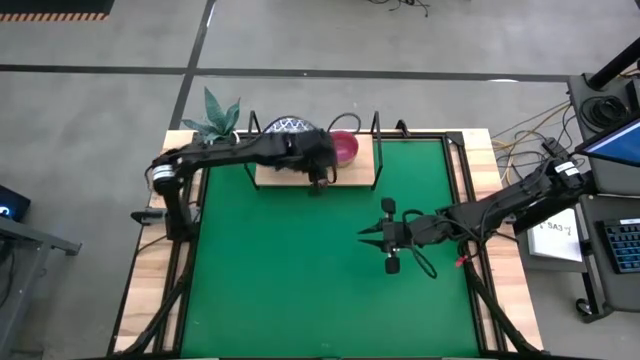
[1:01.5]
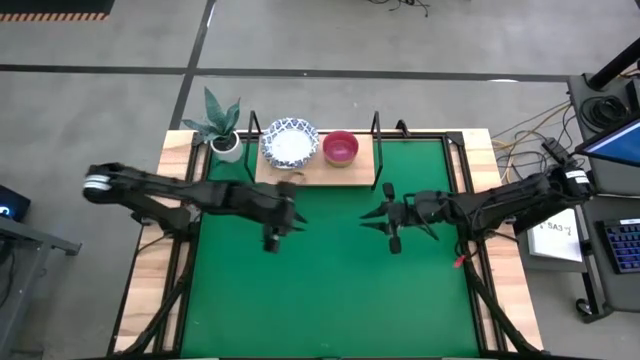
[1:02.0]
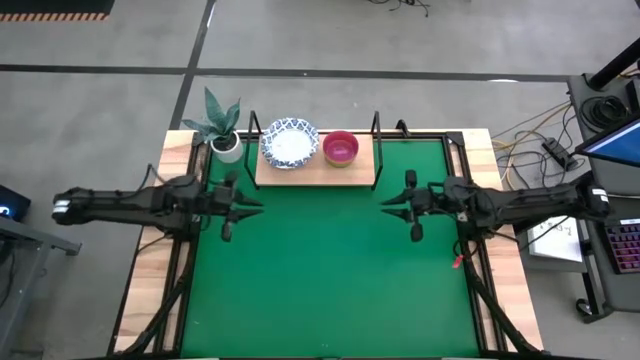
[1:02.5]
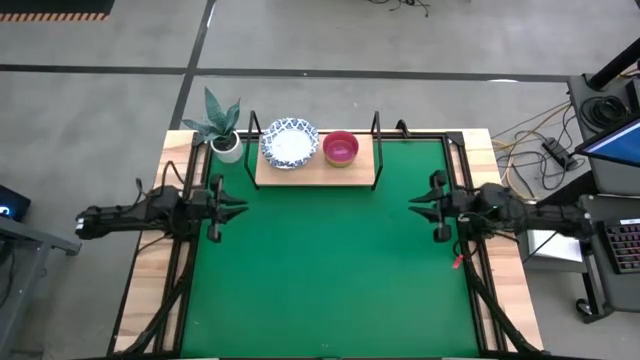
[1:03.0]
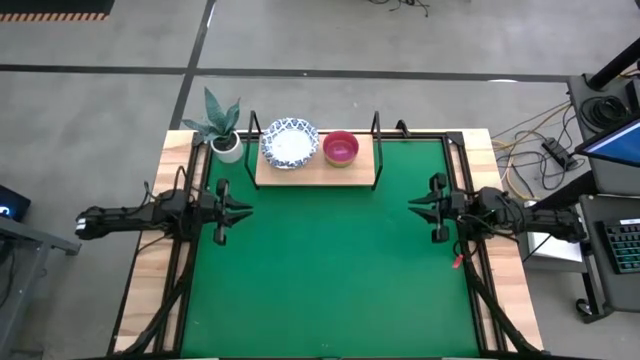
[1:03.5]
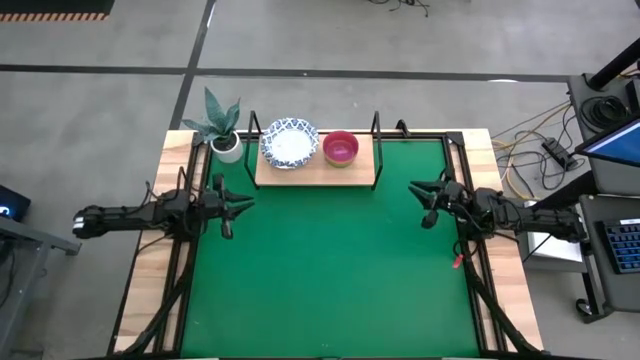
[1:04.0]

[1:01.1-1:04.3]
Task: Place and stack bowls onto a shelf
Return to Home Position

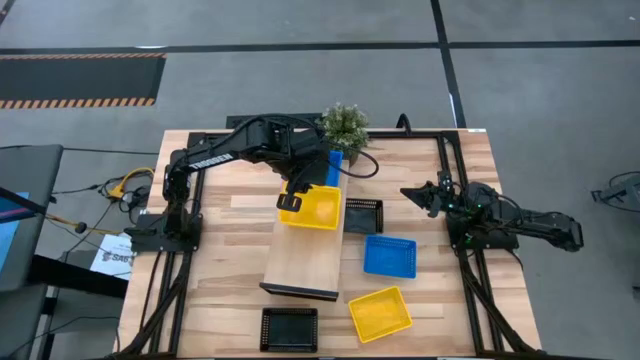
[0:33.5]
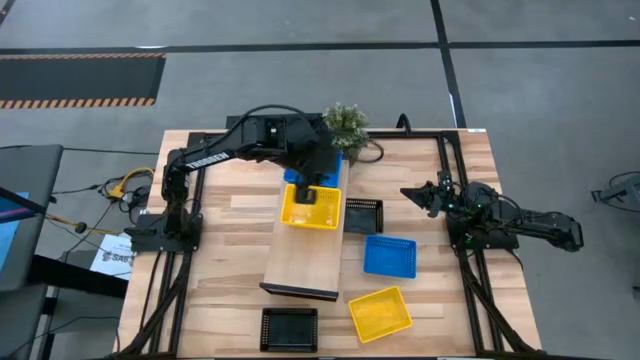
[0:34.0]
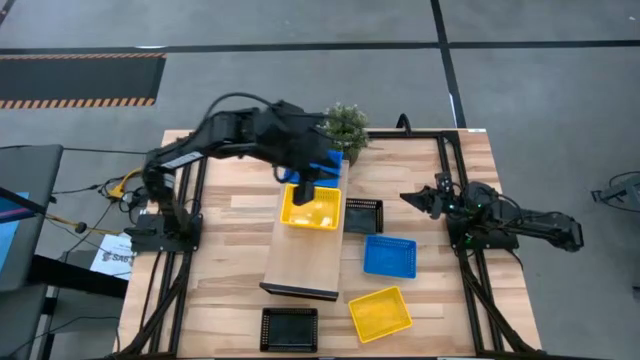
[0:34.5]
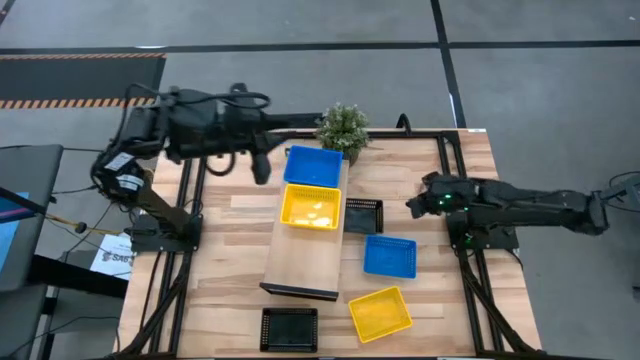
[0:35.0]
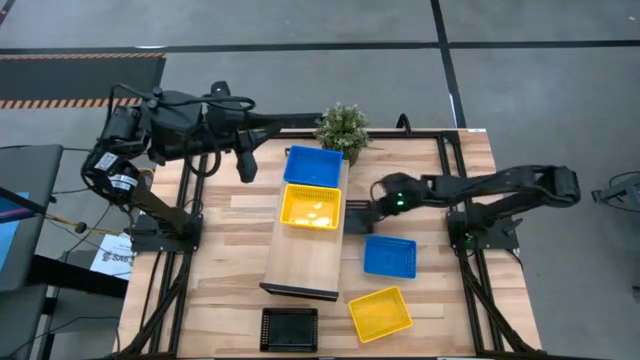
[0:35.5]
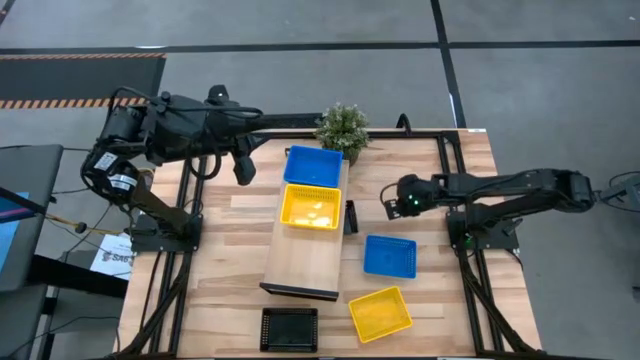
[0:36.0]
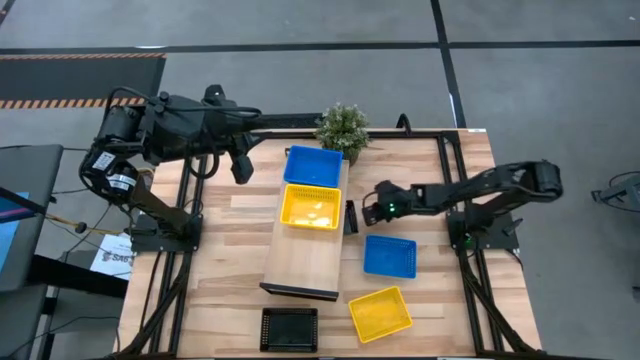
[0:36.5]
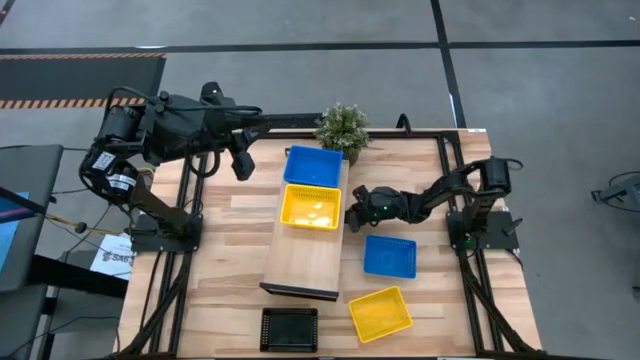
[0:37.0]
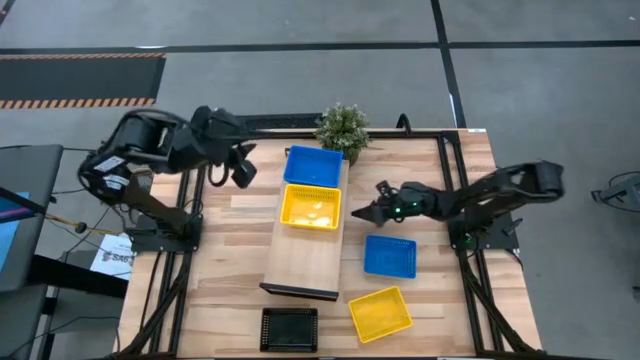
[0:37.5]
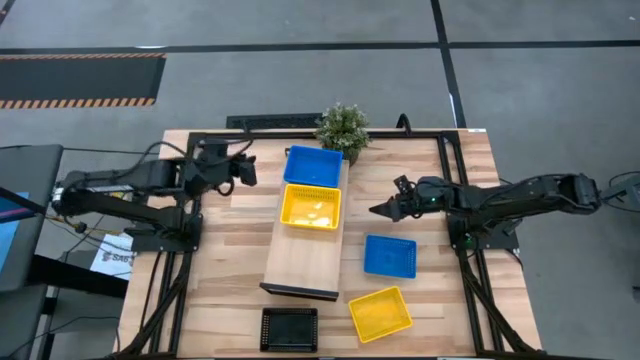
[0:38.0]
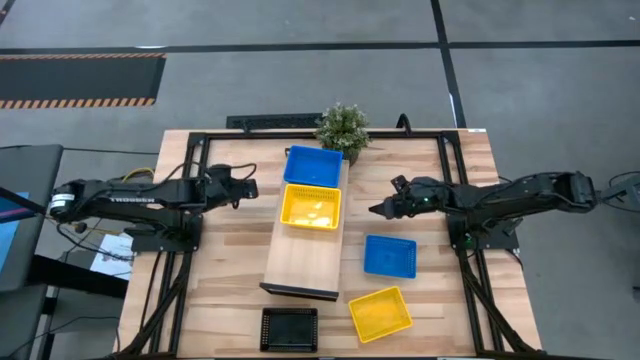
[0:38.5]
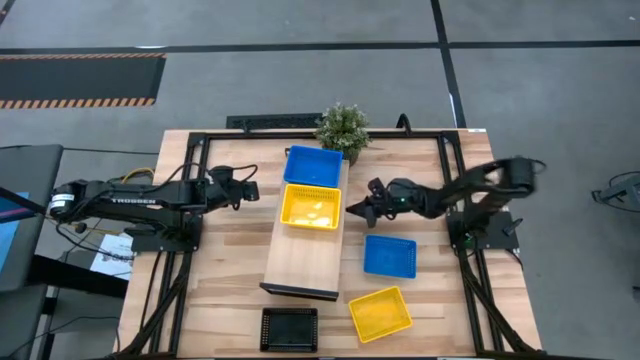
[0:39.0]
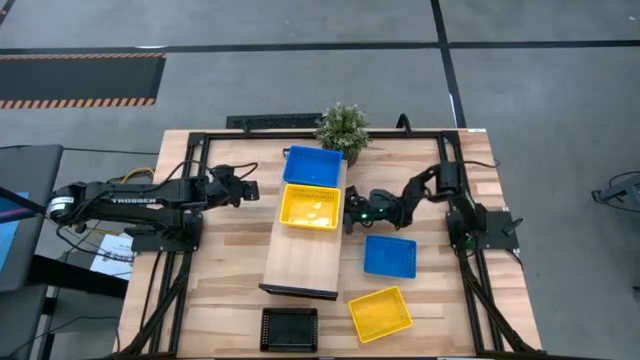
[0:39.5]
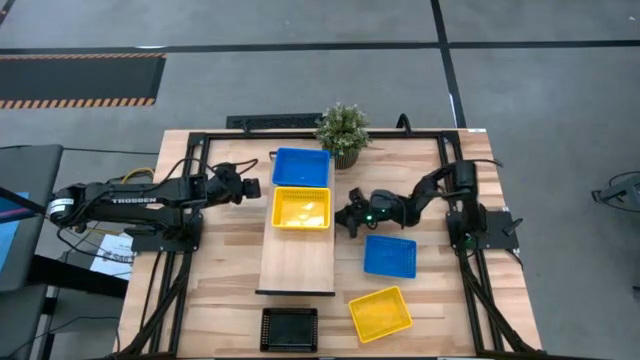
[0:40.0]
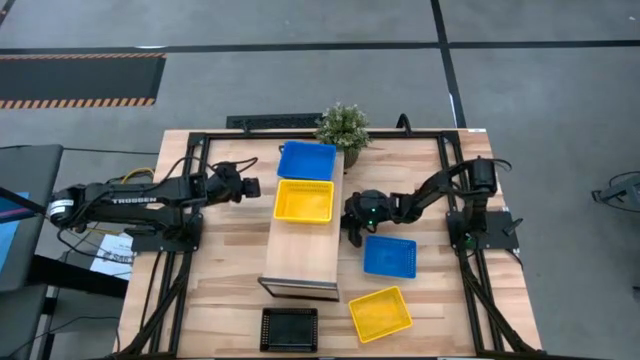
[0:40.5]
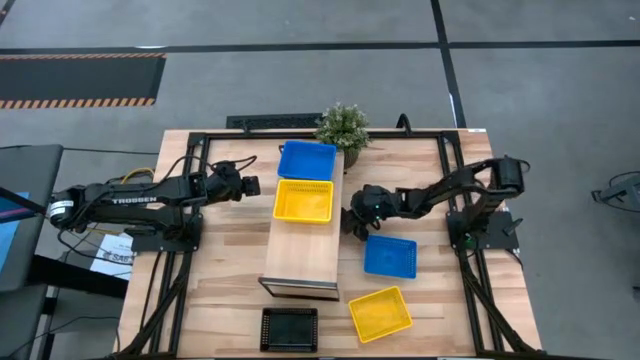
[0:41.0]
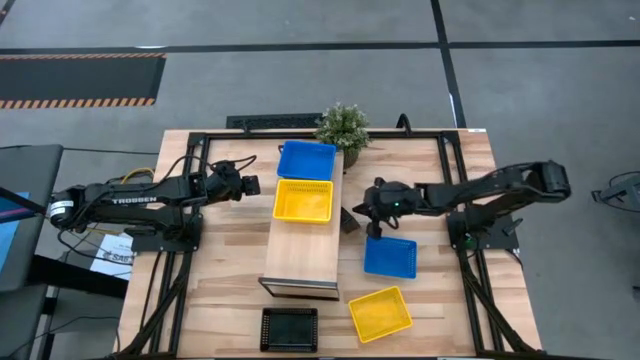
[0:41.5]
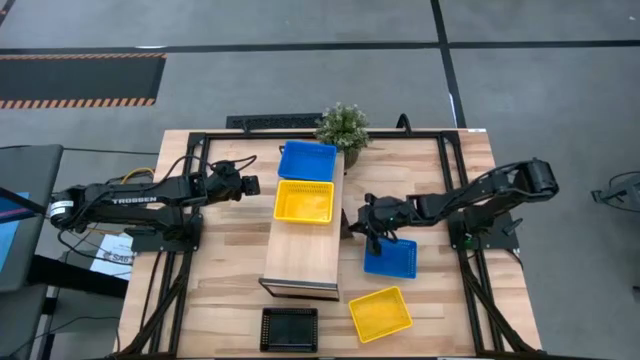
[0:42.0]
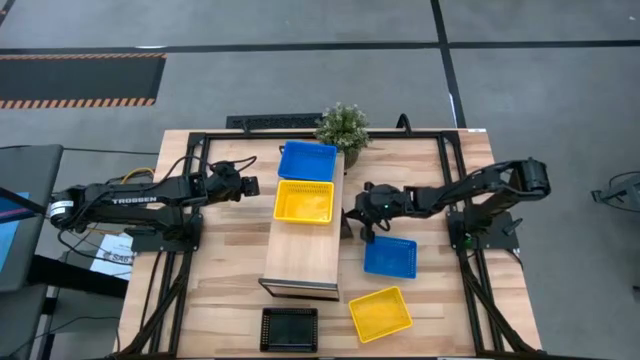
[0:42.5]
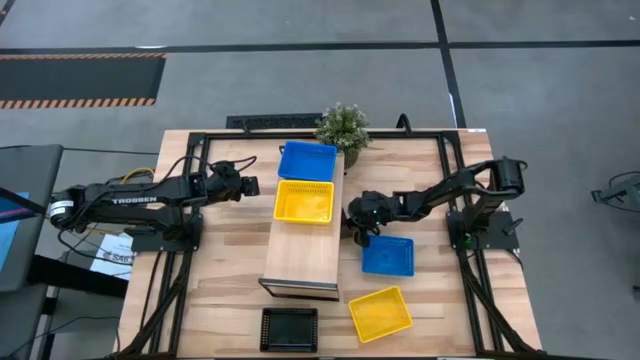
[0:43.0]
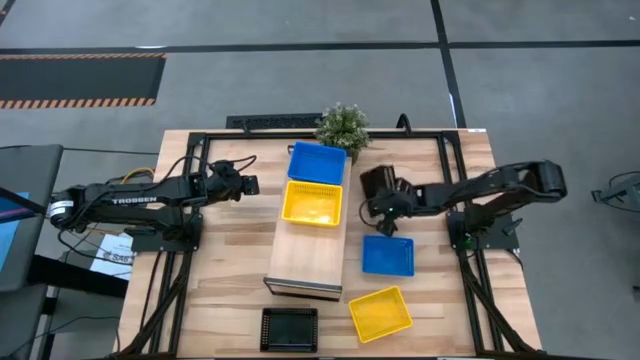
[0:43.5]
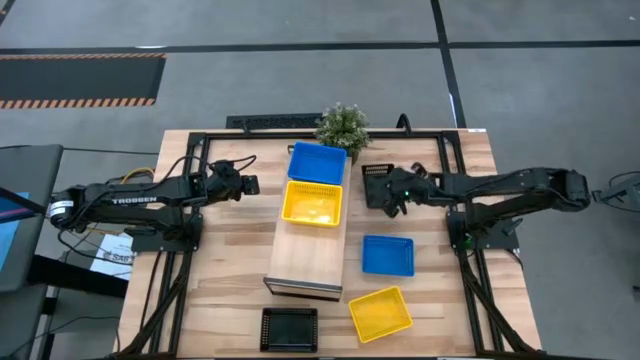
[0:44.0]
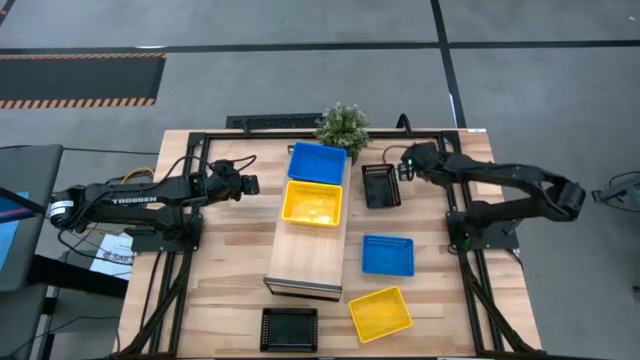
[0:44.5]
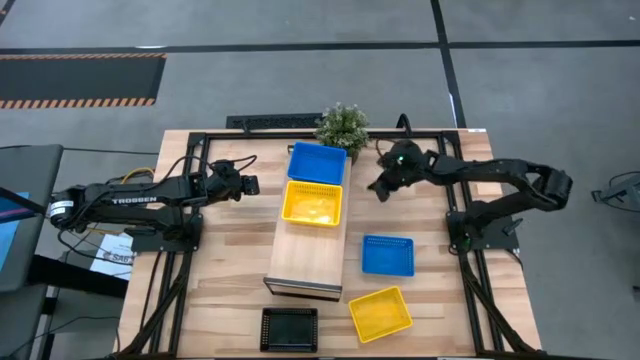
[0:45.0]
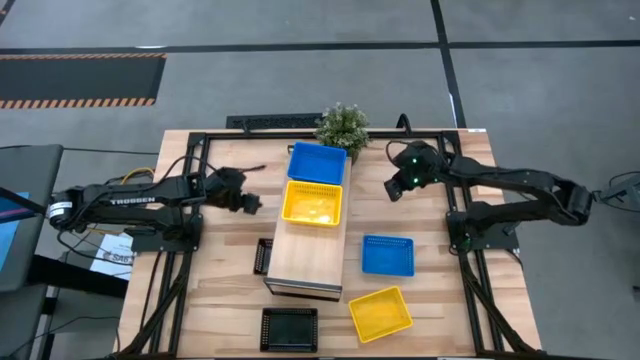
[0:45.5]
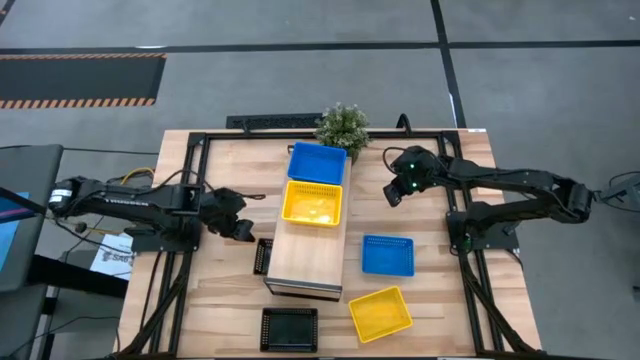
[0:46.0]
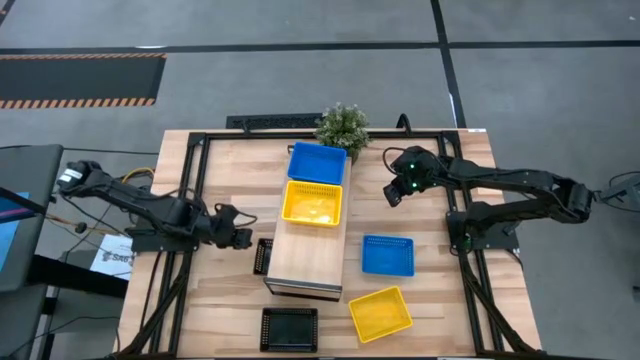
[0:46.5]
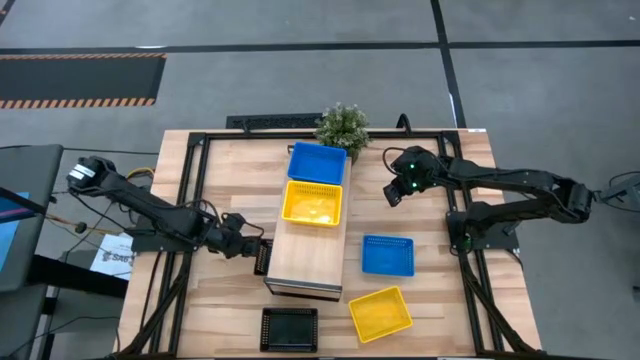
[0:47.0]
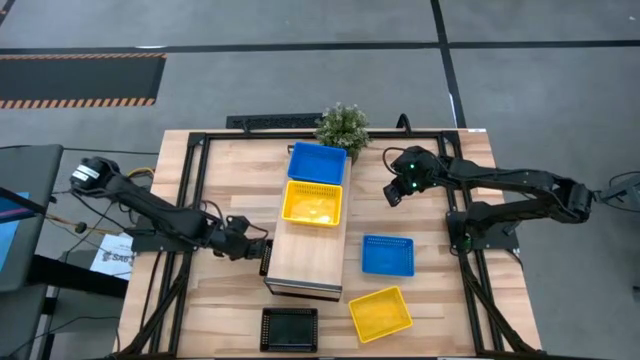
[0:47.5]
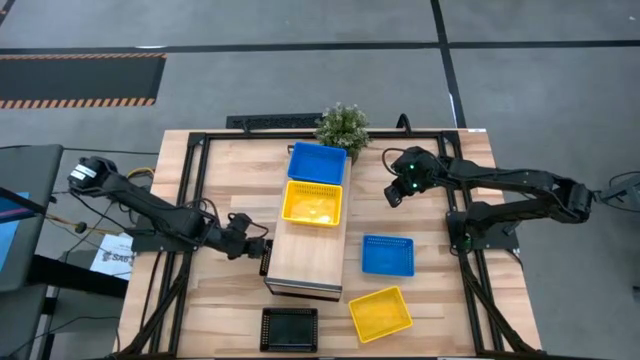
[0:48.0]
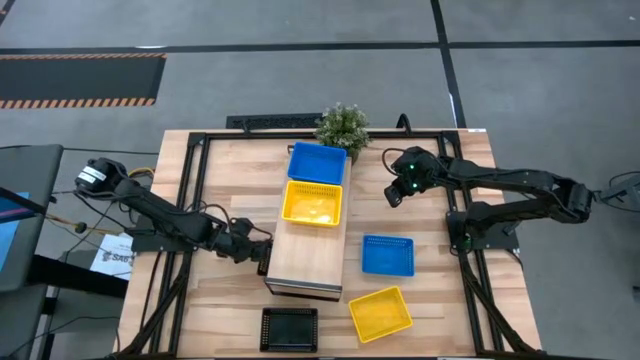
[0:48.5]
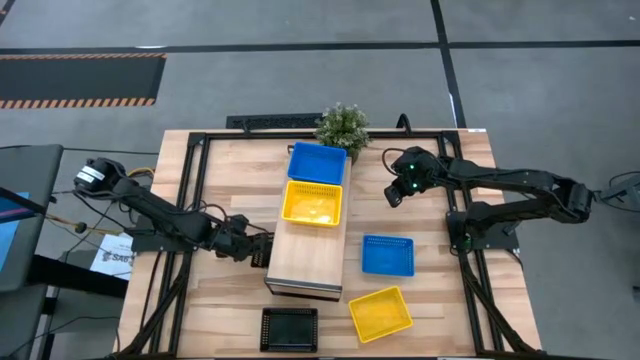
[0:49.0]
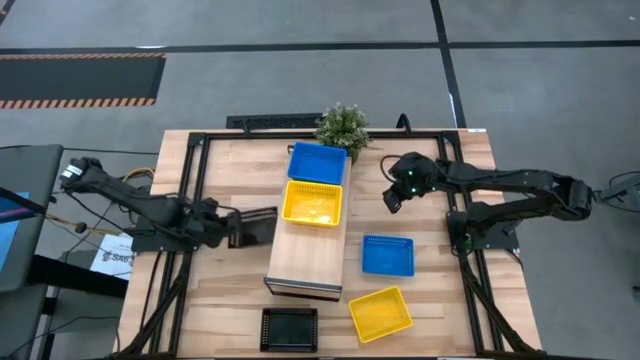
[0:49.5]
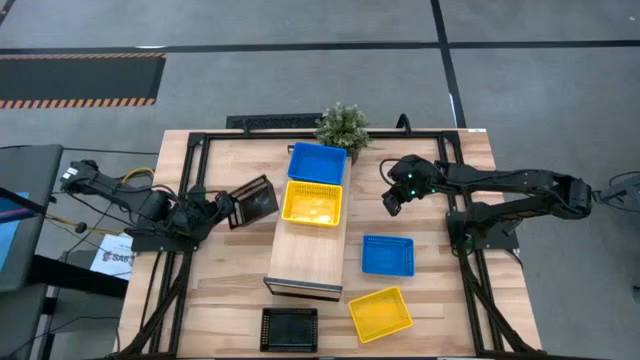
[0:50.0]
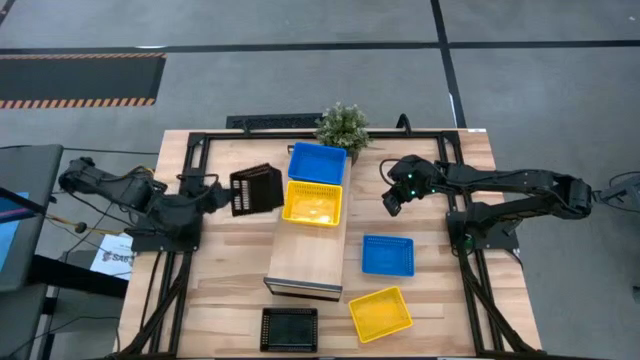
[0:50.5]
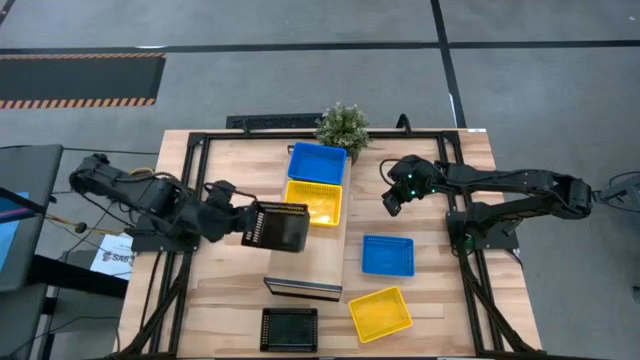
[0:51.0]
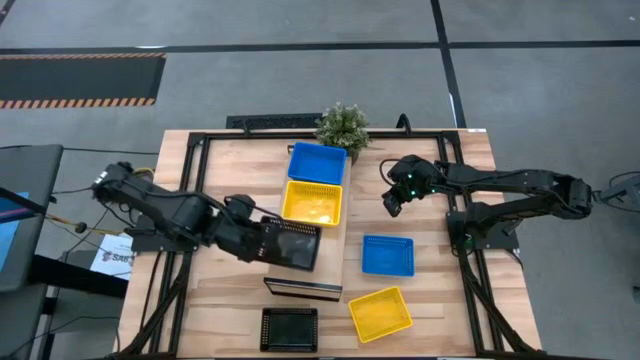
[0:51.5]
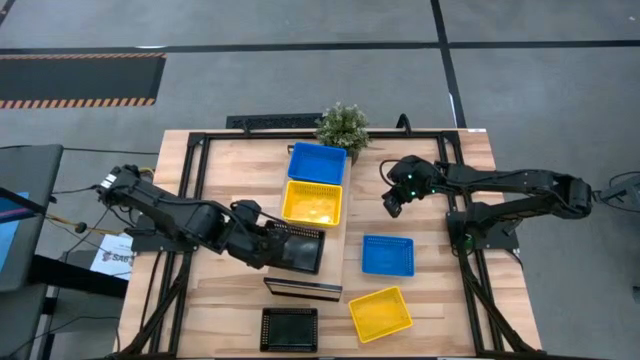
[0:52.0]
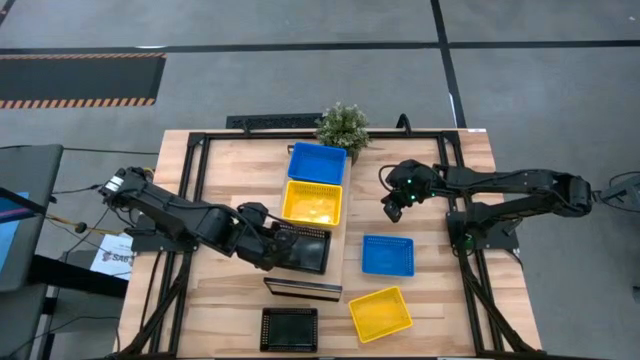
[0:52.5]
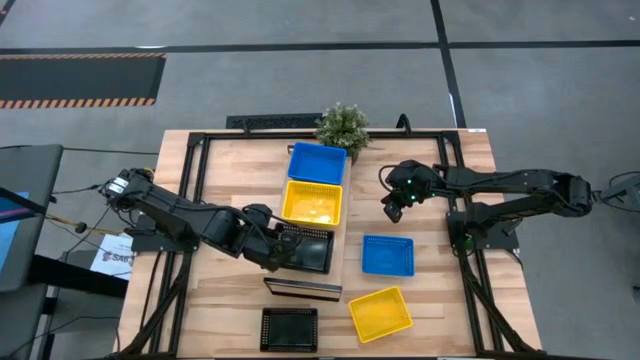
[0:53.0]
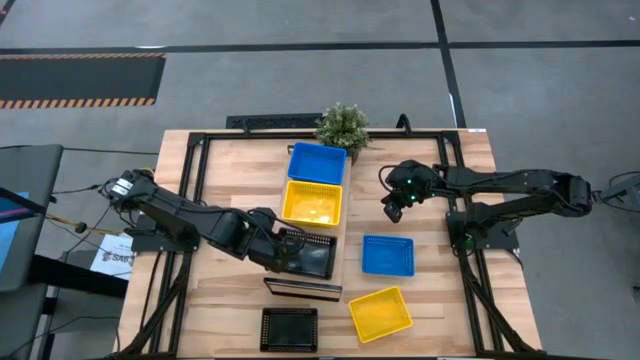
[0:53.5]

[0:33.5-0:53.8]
Task: Stack baskets on shelf by color
Put the top black basket on the shelf
